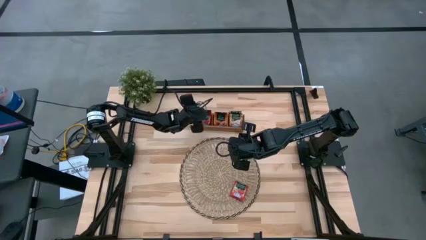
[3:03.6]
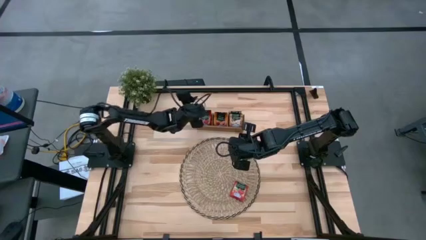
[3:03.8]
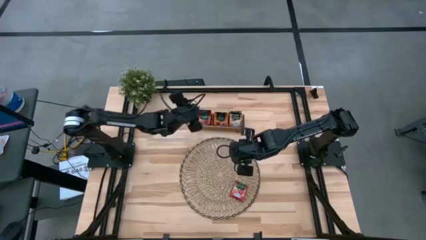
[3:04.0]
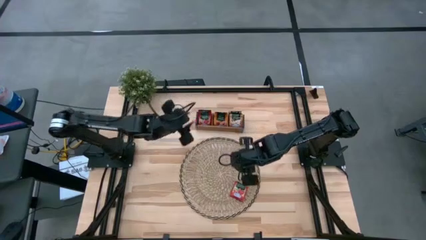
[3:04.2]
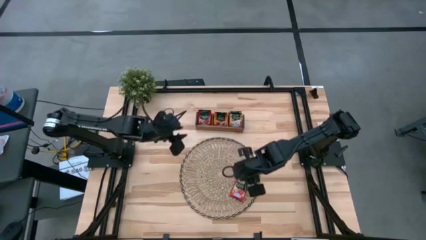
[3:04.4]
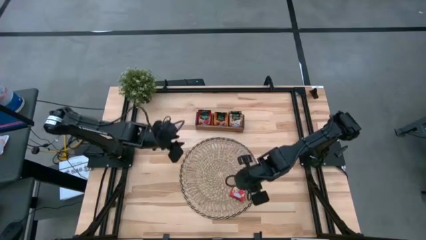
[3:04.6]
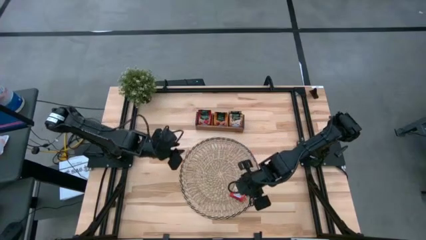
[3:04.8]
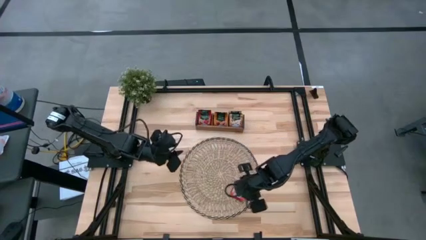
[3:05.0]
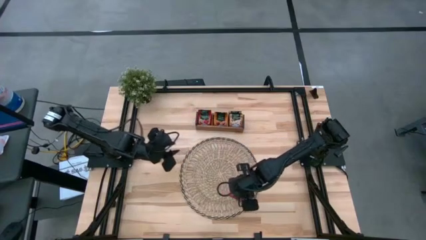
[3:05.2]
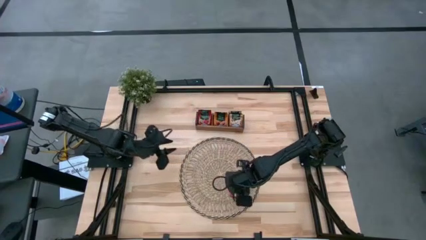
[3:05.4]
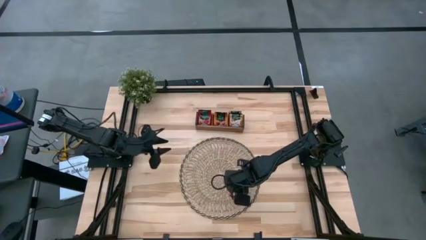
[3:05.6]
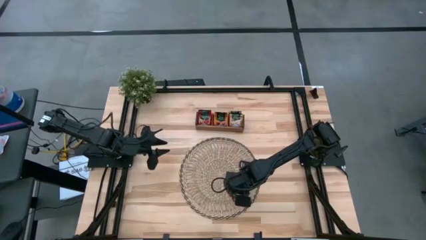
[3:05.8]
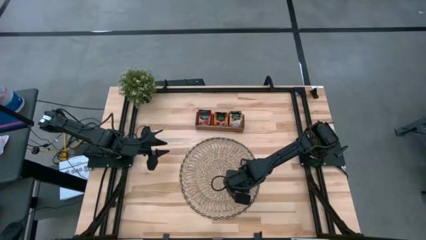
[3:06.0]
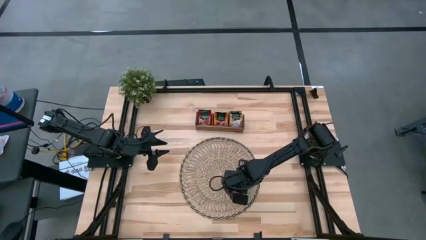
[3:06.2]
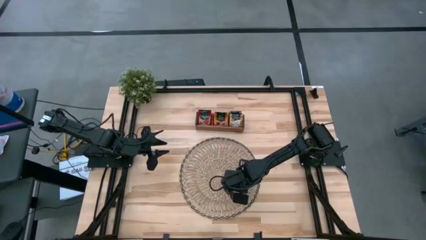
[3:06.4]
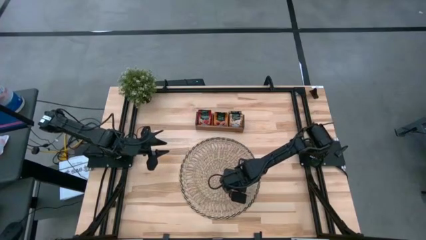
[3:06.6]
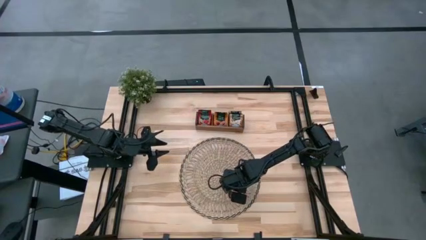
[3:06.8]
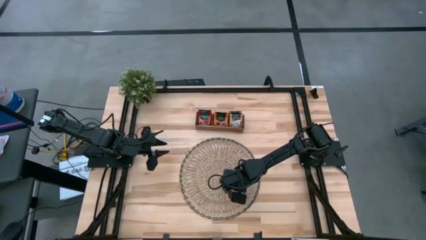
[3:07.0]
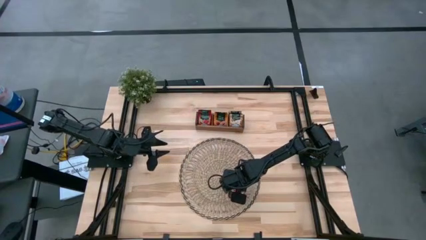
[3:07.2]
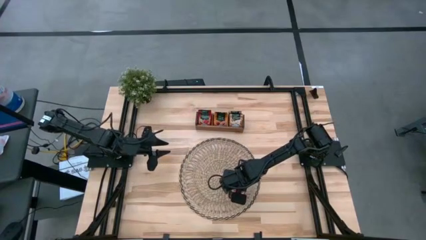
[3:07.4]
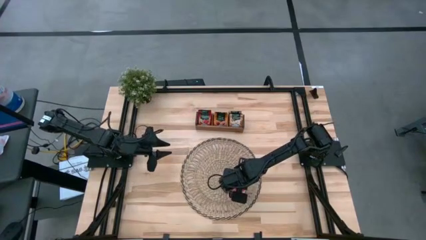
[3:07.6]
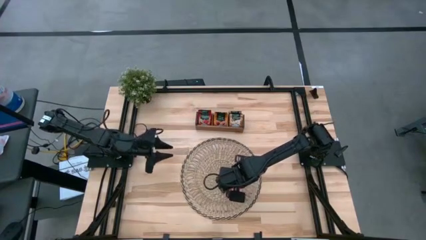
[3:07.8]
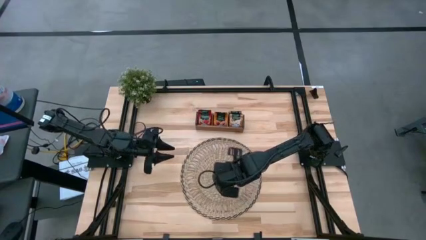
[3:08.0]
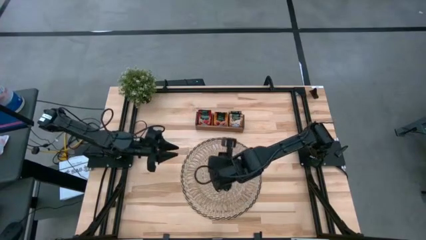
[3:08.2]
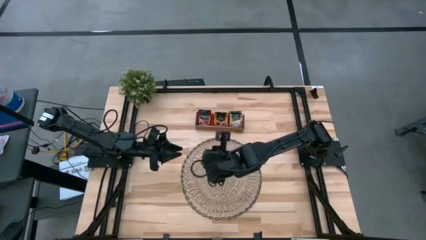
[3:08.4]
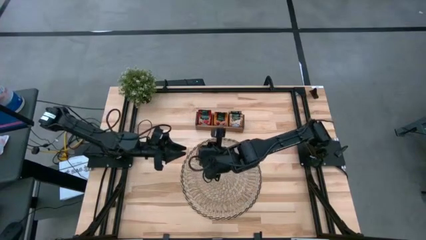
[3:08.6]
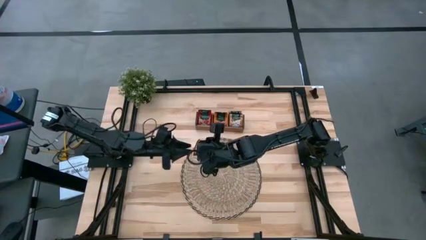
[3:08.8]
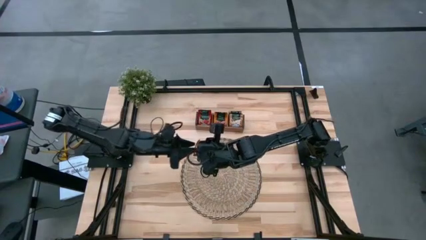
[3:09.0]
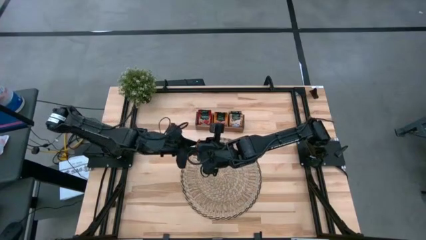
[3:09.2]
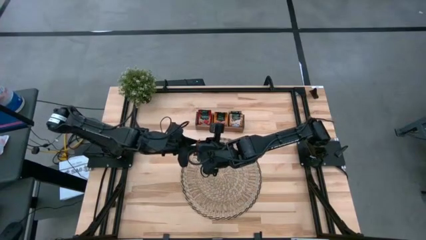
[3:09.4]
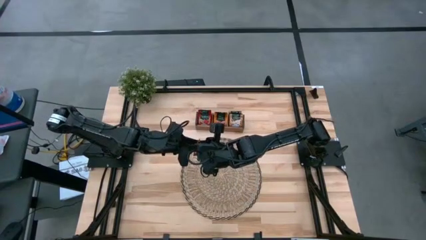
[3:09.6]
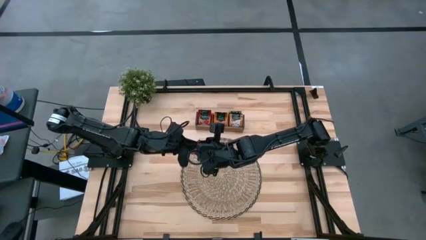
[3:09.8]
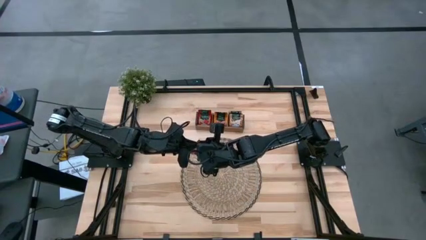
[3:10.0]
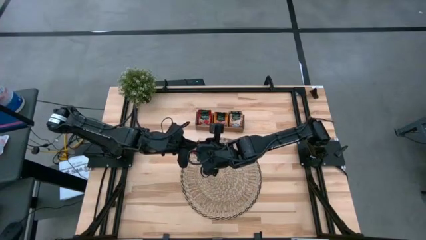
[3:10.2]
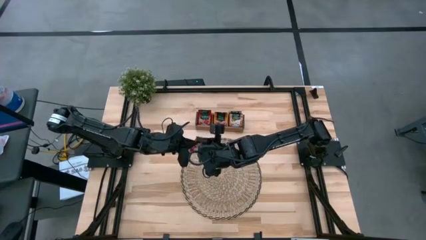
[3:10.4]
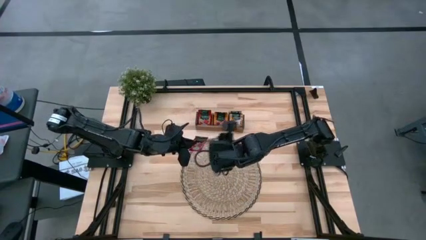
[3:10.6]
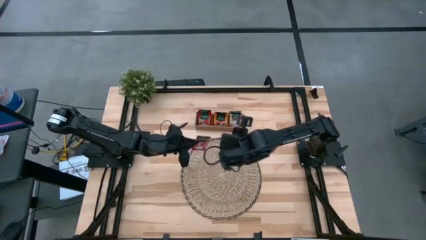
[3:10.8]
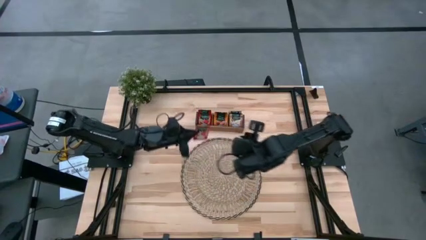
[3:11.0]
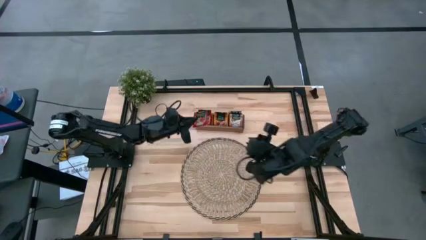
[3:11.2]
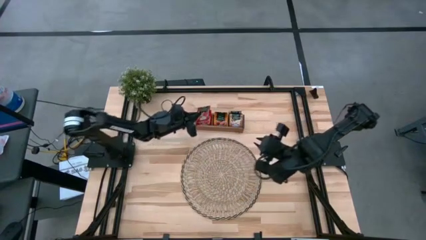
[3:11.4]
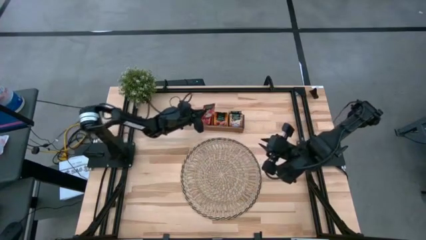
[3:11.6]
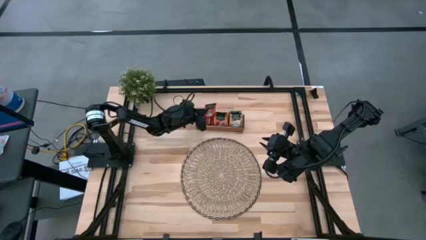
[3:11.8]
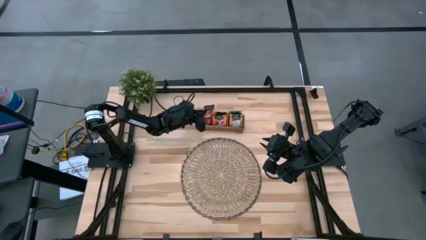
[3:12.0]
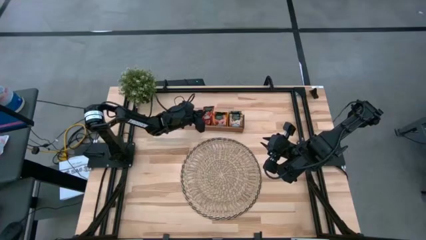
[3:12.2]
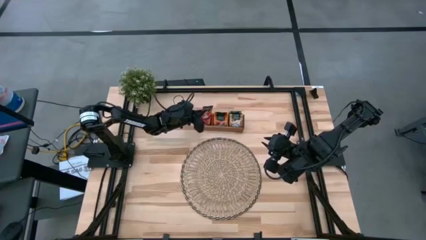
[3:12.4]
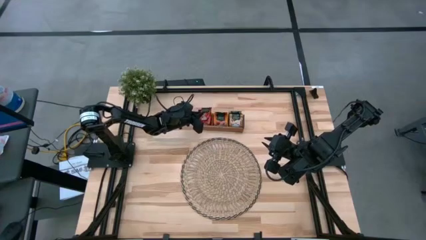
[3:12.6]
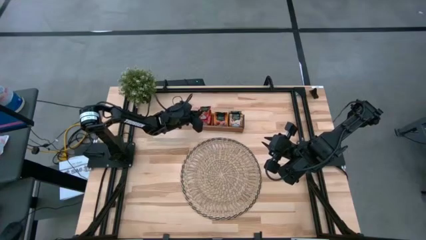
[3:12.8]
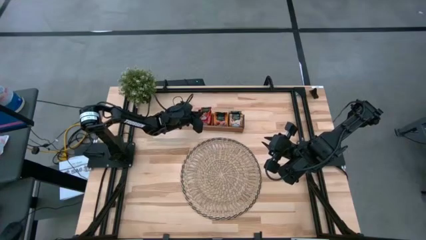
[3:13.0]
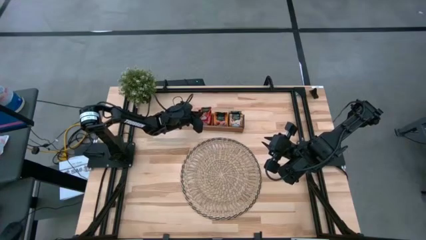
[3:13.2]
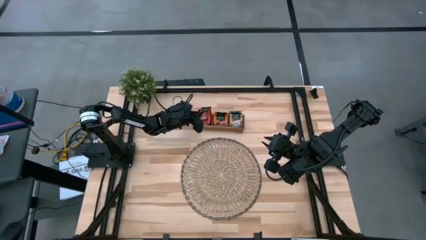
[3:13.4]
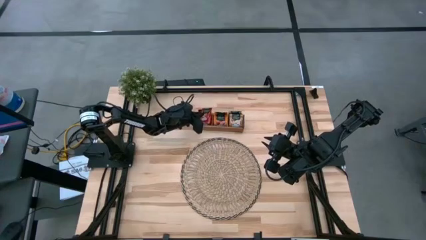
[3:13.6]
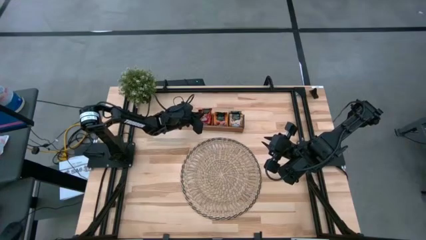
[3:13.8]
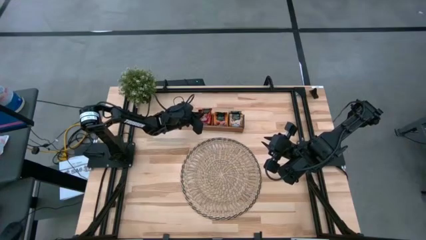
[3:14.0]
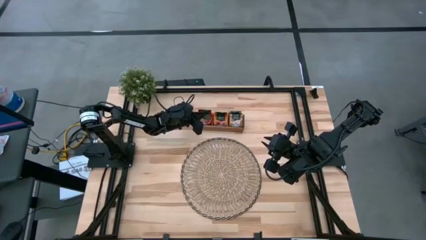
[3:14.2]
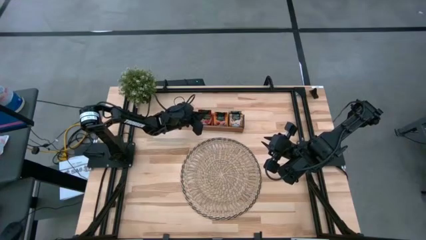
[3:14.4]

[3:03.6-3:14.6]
Task: Pick & Place Tea
Put the red tea bag into the left section of the wooden organizer

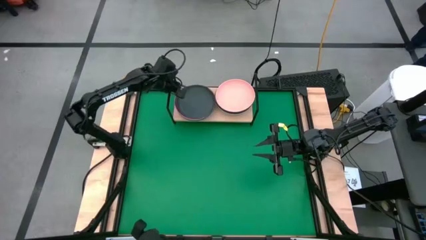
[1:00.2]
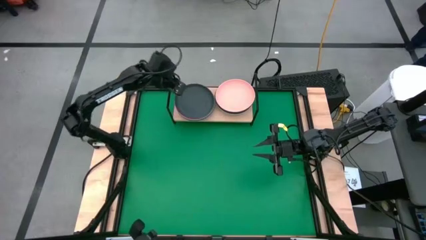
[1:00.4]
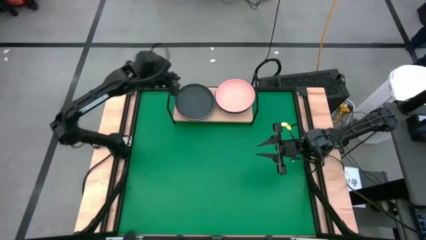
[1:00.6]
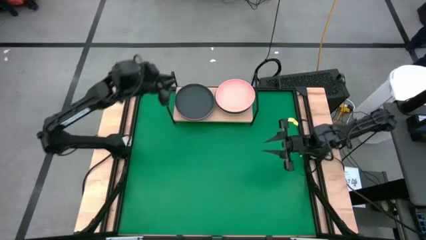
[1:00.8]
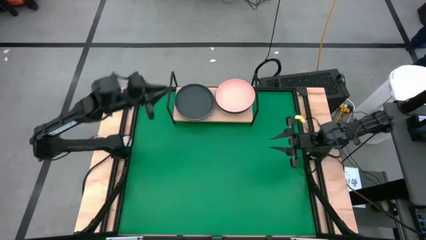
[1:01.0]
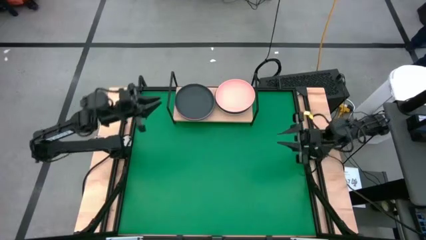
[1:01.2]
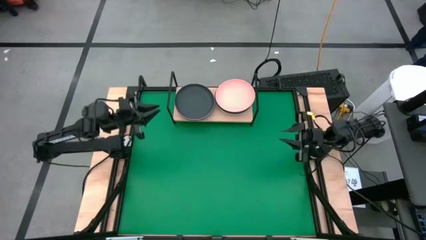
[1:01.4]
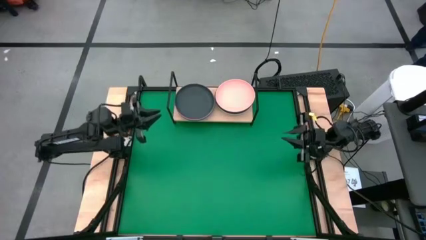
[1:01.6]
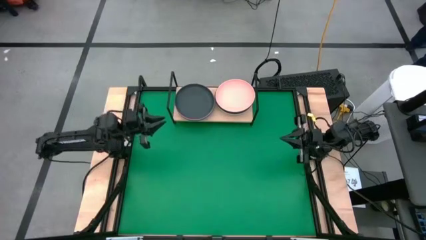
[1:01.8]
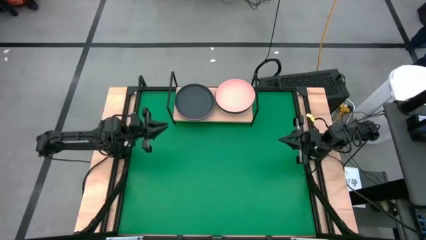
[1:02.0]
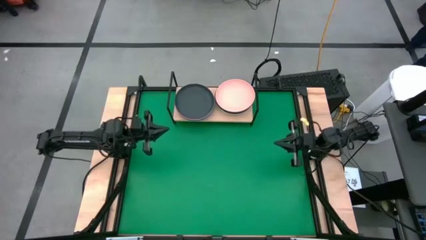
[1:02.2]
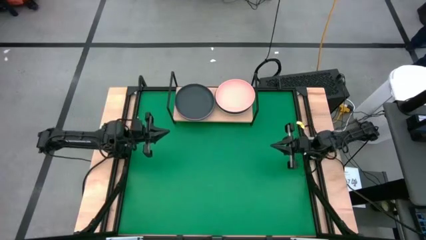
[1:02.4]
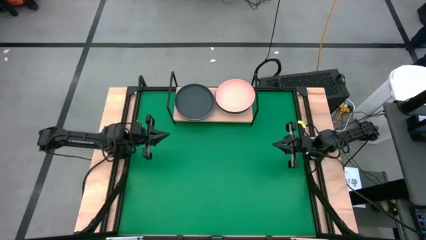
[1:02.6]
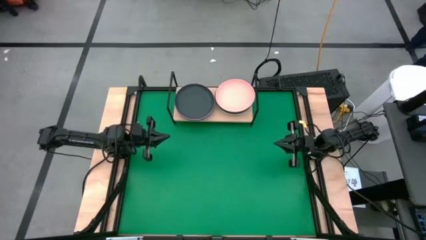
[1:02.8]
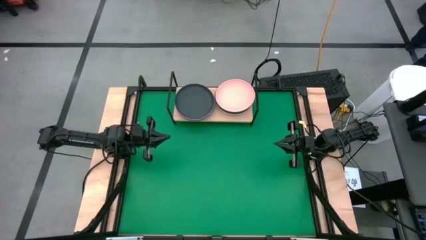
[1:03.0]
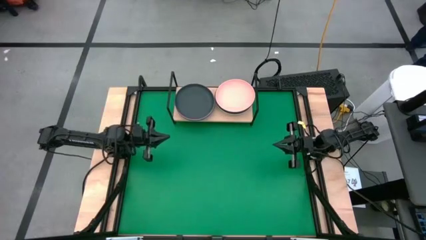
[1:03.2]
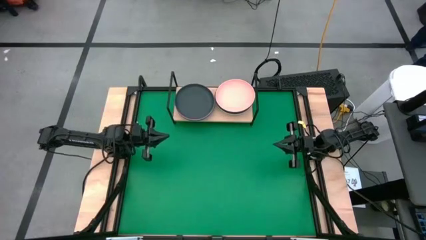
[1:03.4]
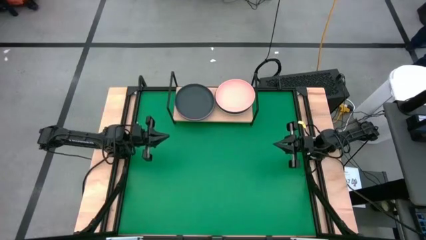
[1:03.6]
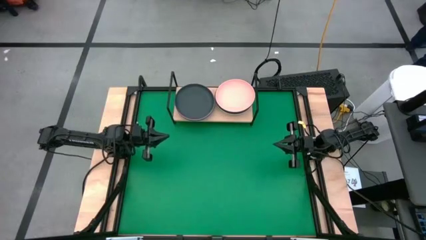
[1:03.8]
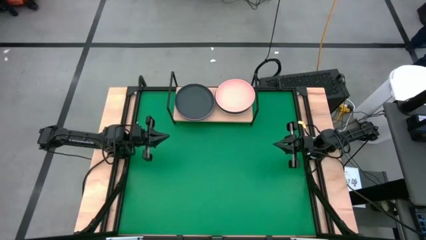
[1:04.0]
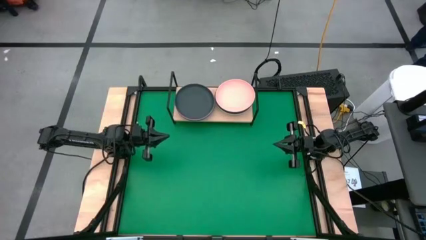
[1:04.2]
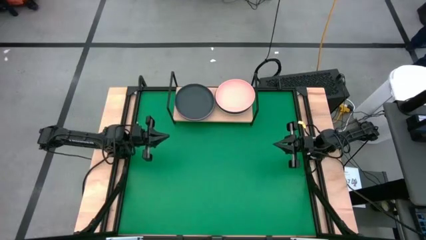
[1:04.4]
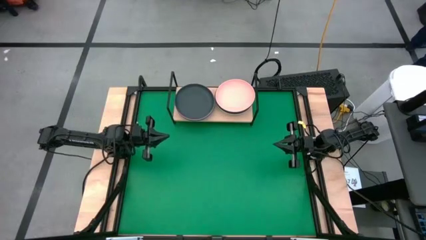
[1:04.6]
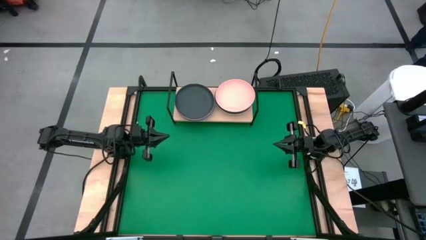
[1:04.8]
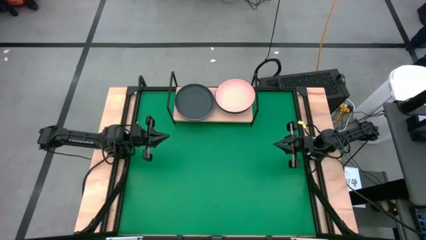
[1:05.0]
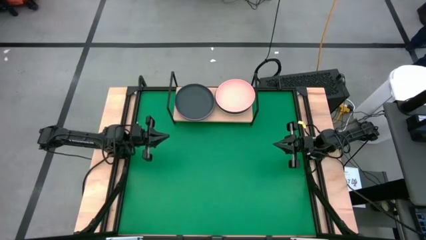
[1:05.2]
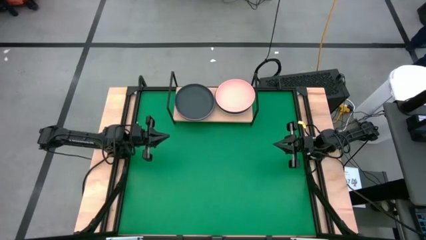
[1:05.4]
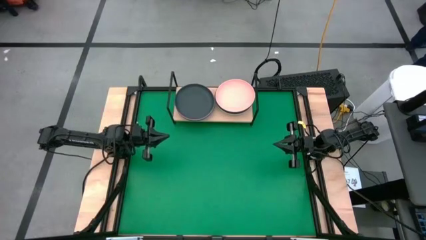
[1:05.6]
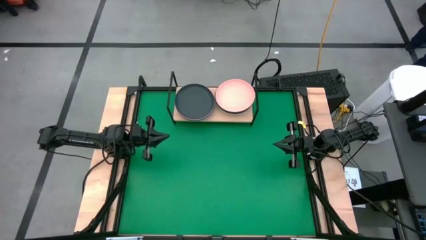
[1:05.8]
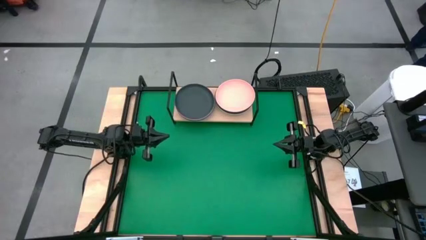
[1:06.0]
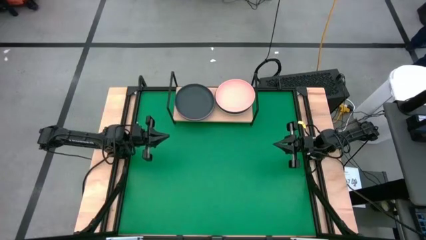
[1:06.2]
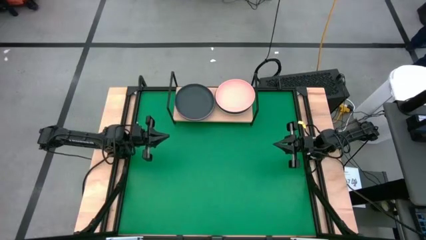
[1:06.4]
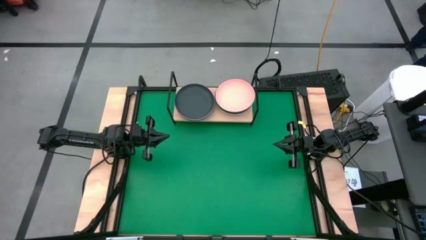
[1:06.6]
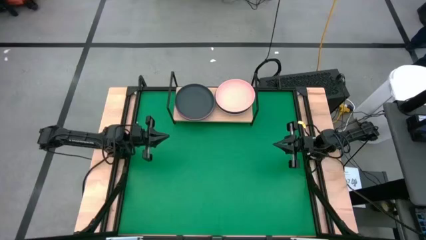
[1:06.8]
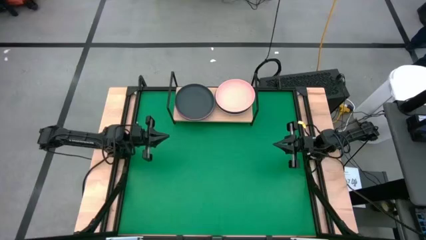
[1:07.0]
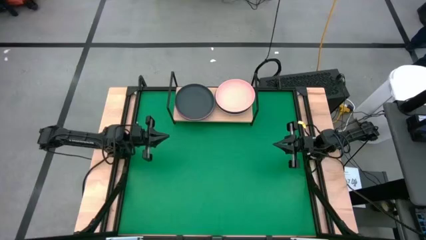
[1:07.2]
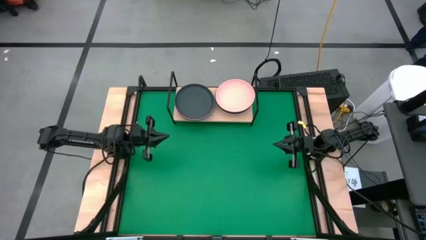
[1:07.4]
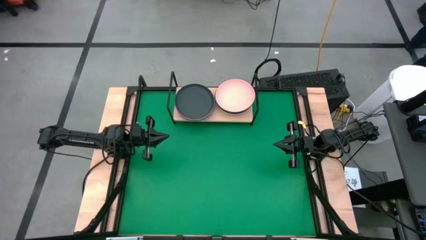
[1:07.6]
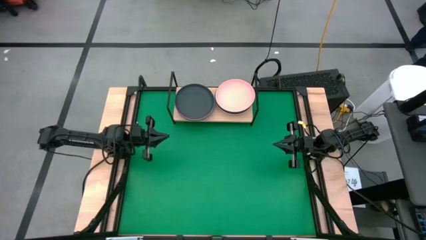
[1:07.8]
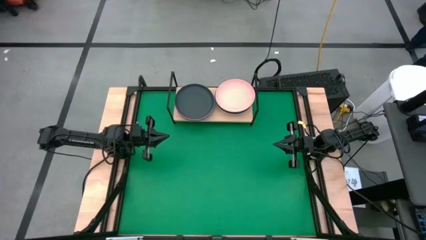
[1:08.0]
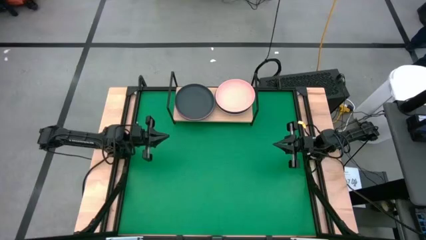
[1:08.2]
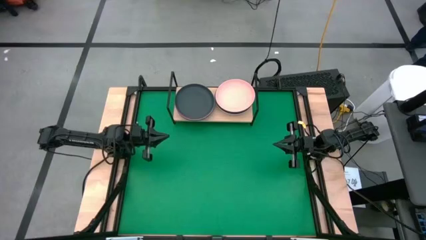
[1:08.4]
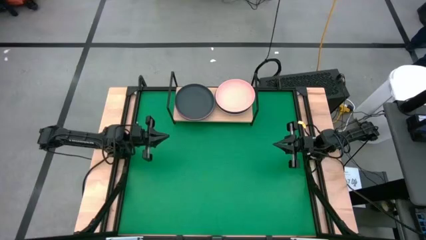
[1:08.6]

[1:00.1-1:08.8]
Task: Place and stack plates onto a shelf
Return to Home Position
